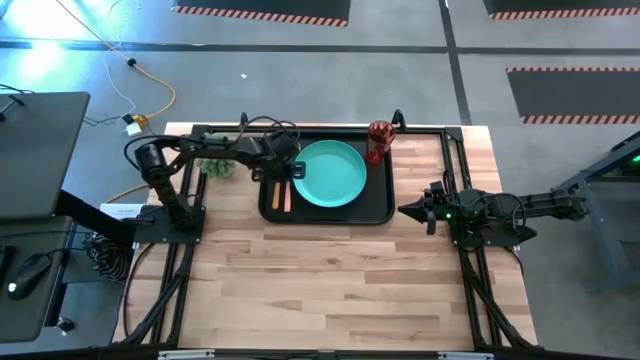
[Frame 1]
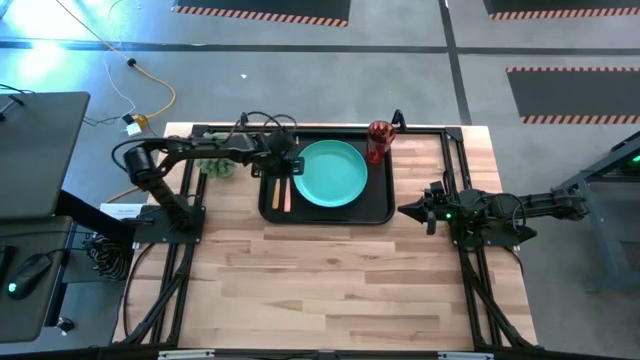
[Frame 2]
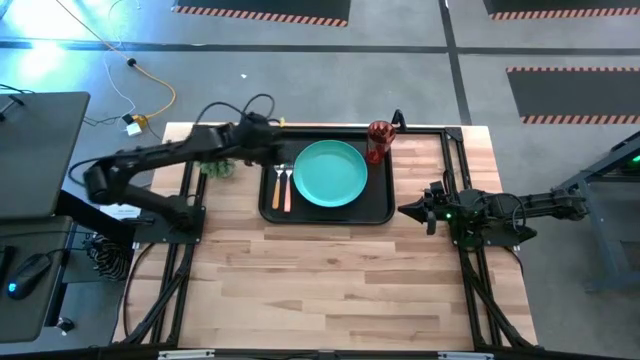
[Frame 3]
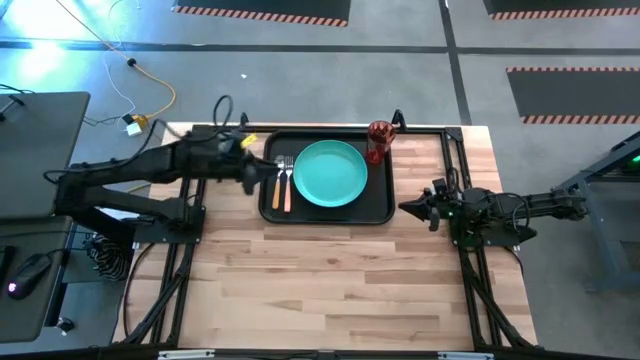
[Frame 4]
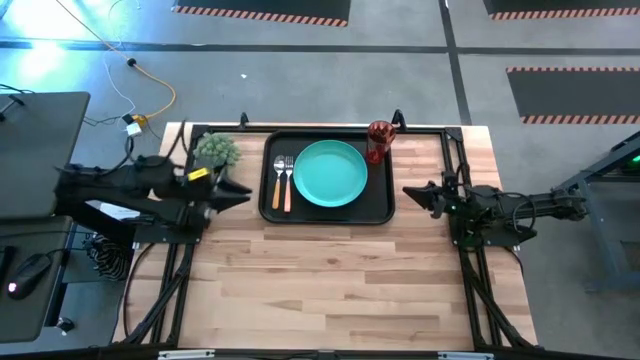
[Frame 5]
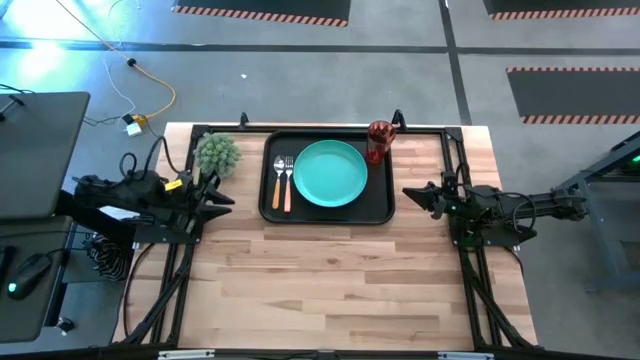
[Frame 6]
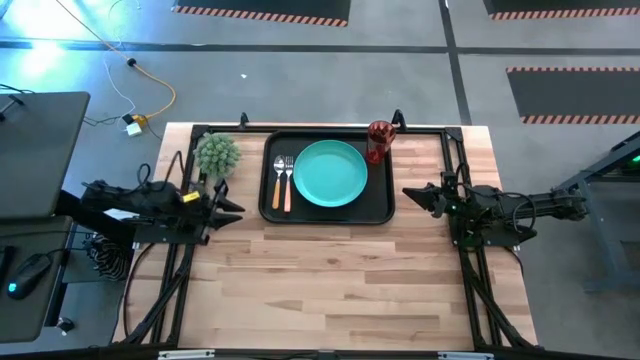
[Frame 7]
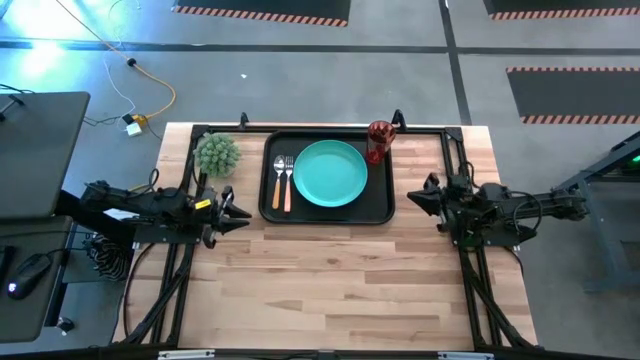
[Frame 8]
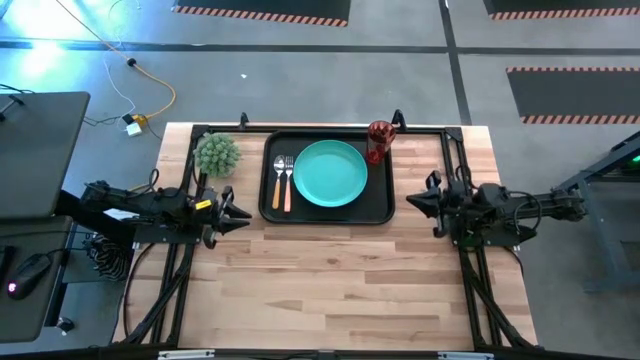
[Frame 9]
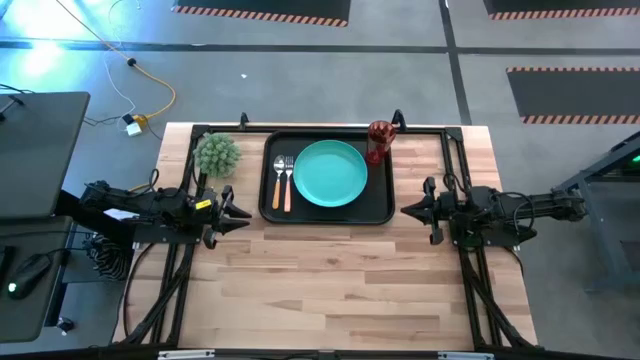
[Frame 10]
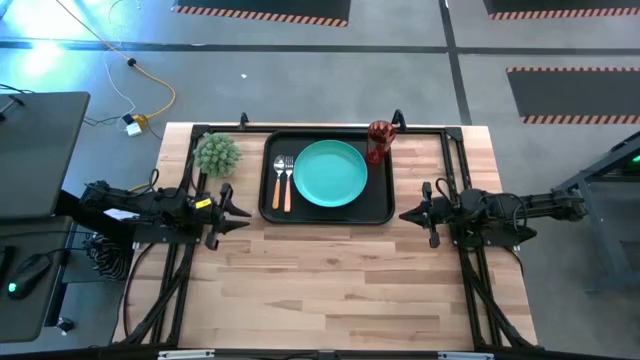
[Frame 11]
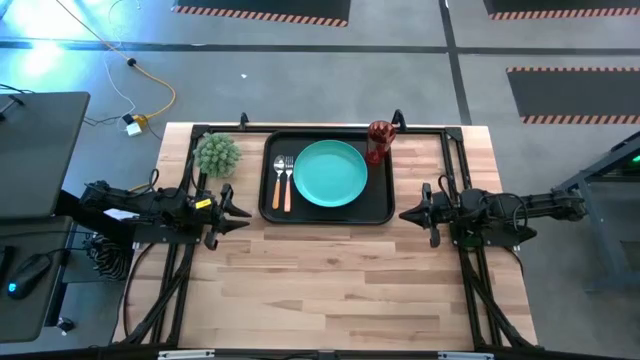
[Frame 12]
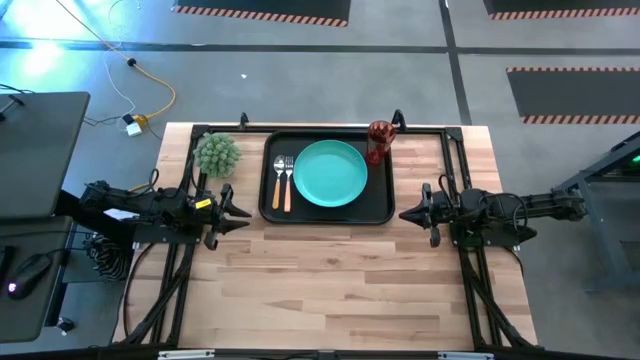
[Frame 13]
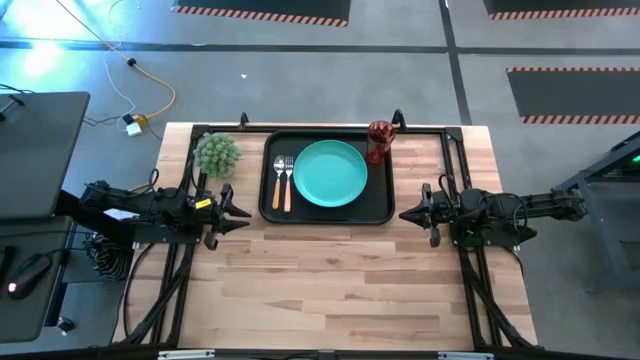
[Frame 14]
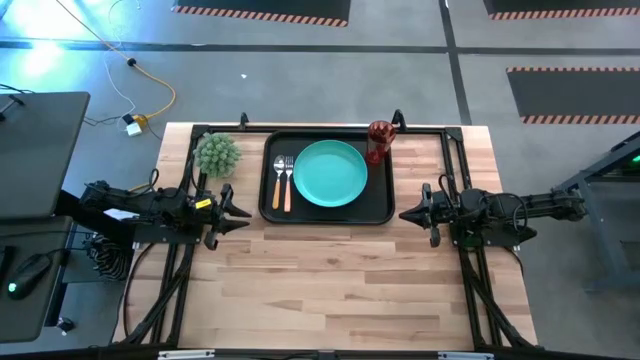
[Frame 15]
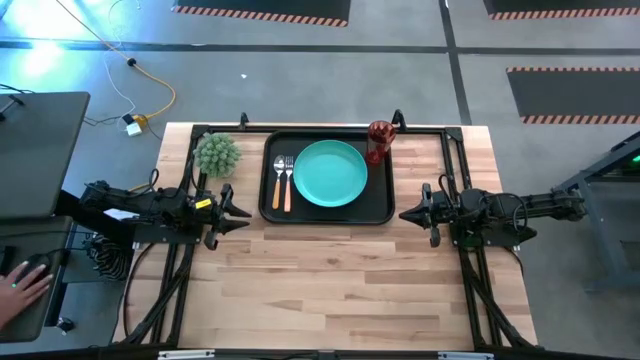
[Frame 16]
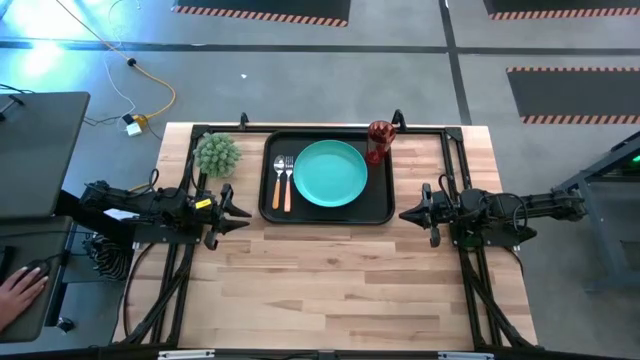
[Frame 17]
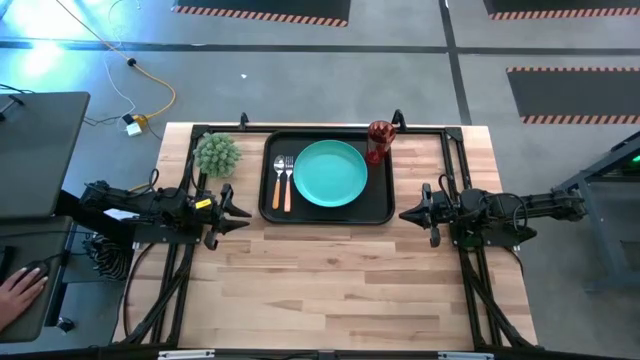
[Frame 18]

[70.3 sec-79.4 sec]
Task: Pick and place plate/cup/fork/spoon on tray
Return to Home Position

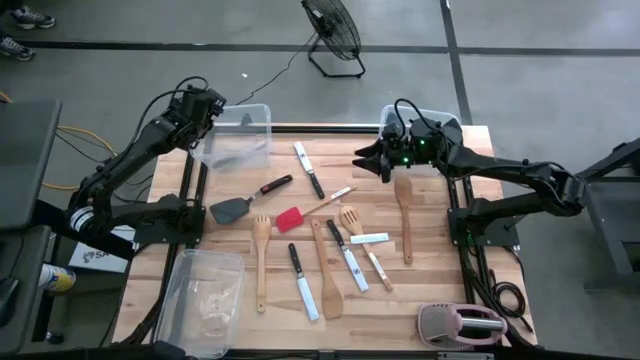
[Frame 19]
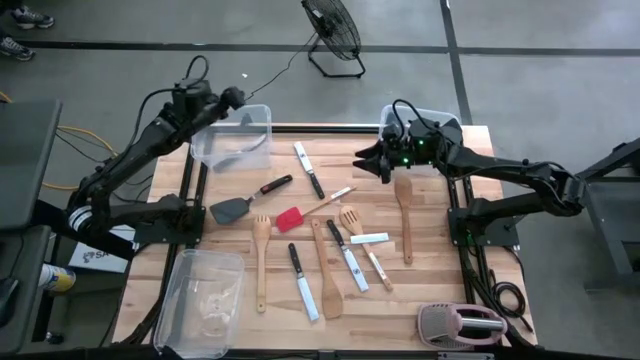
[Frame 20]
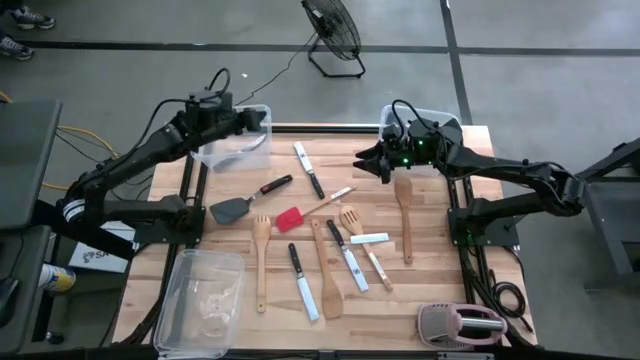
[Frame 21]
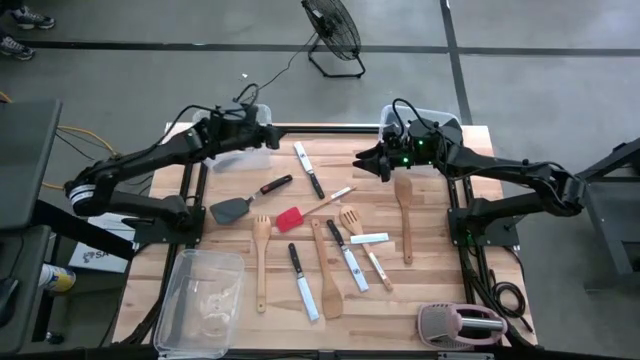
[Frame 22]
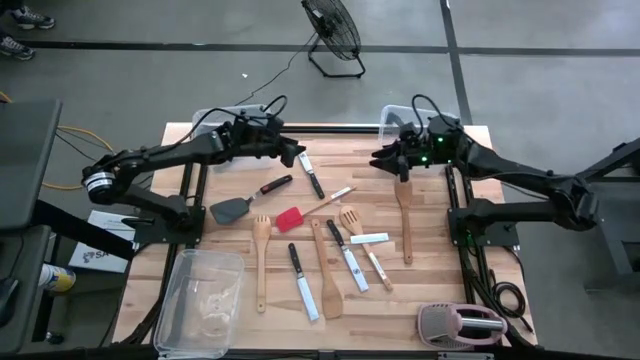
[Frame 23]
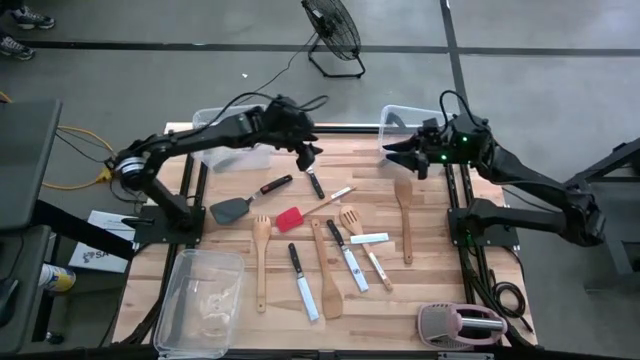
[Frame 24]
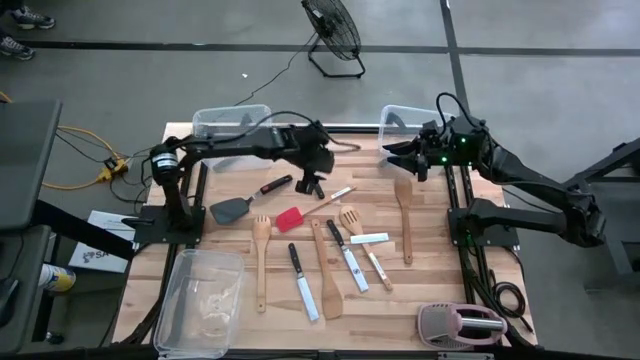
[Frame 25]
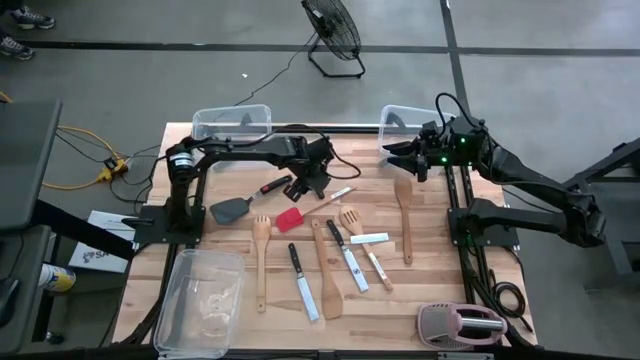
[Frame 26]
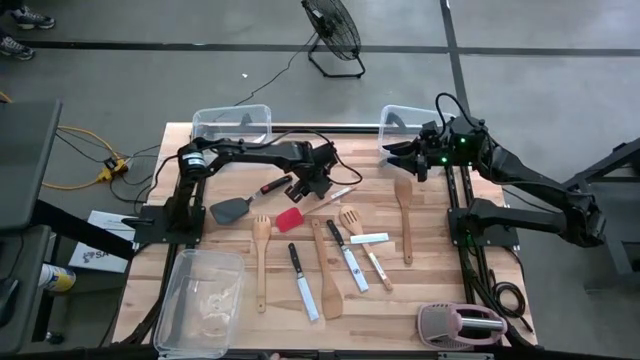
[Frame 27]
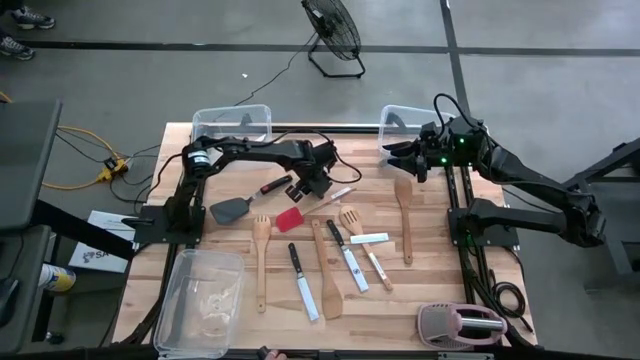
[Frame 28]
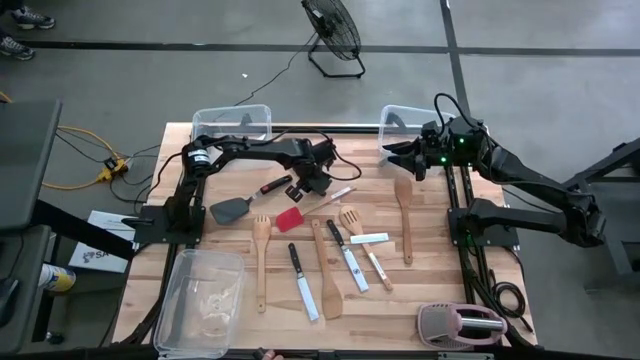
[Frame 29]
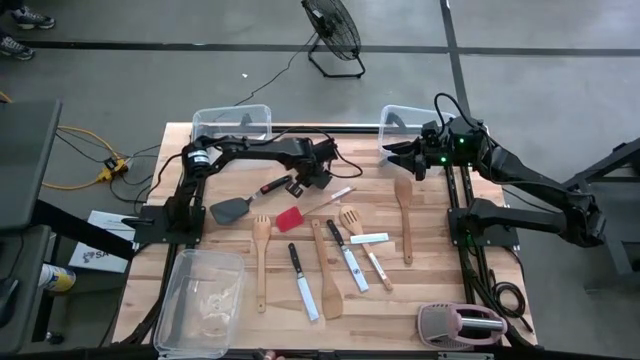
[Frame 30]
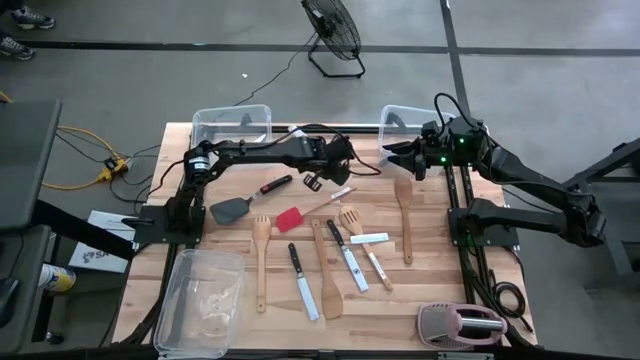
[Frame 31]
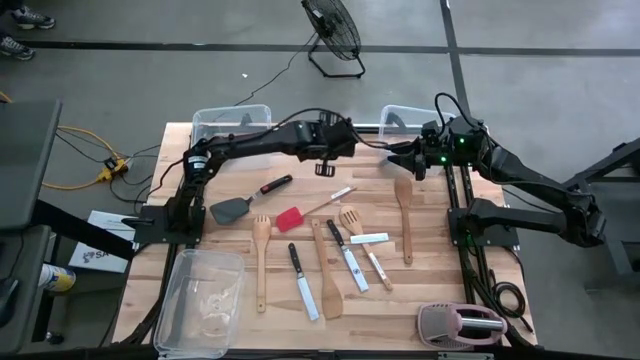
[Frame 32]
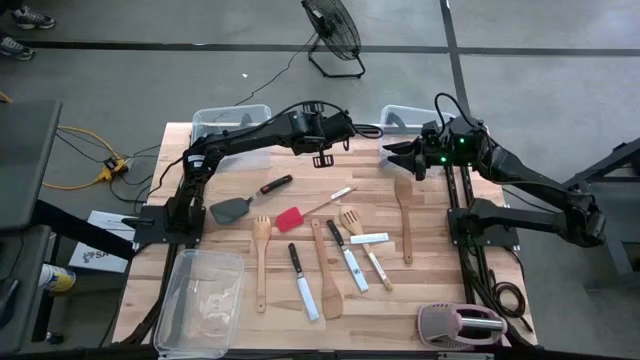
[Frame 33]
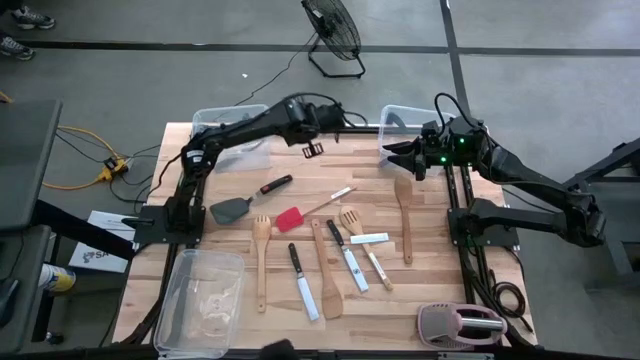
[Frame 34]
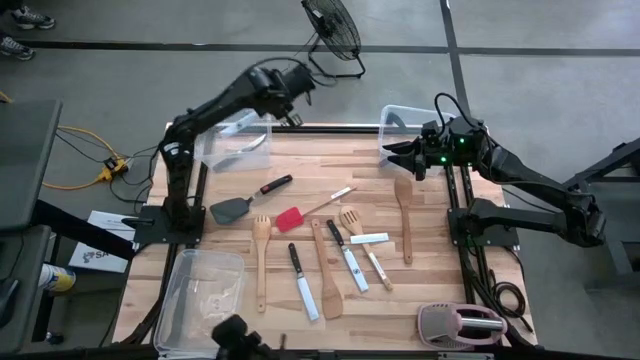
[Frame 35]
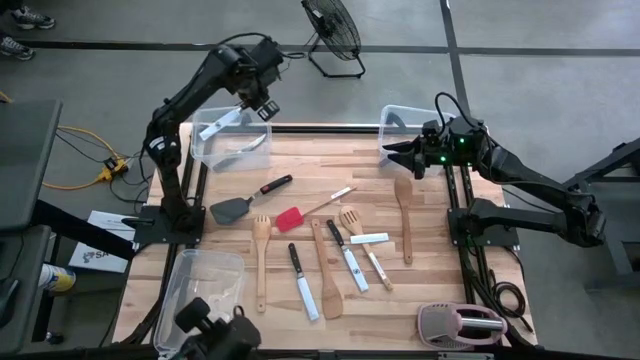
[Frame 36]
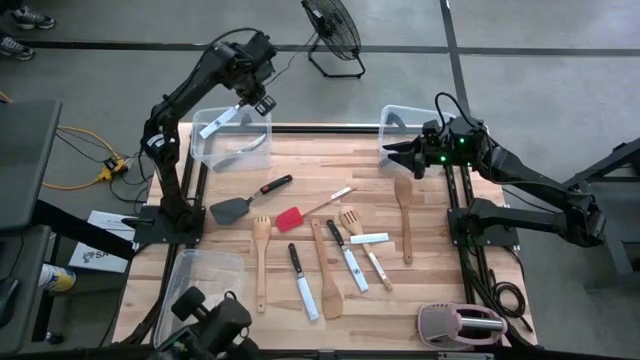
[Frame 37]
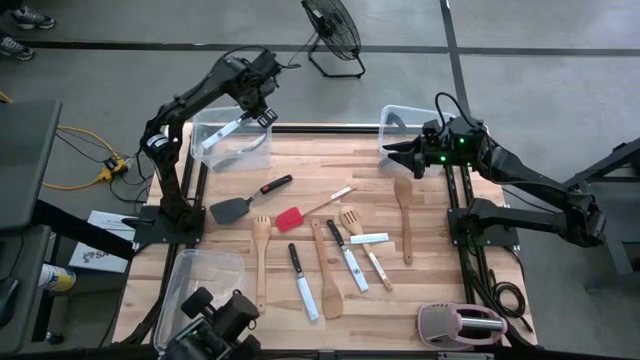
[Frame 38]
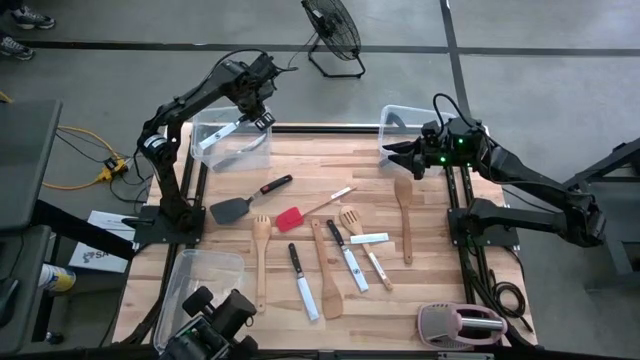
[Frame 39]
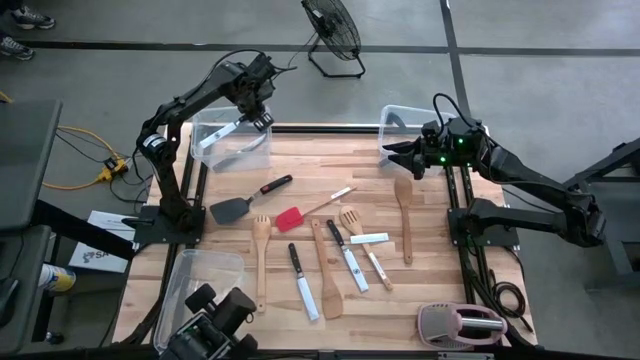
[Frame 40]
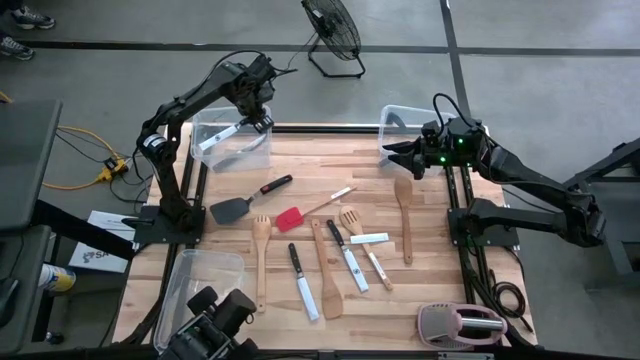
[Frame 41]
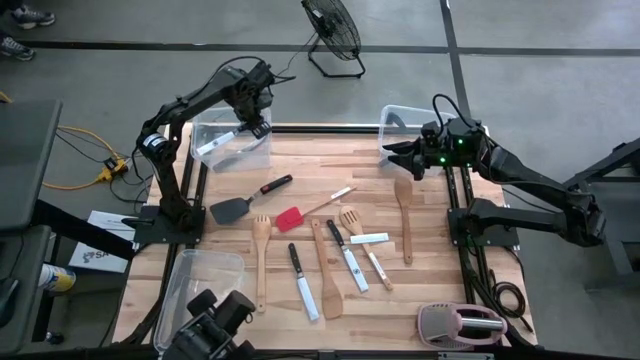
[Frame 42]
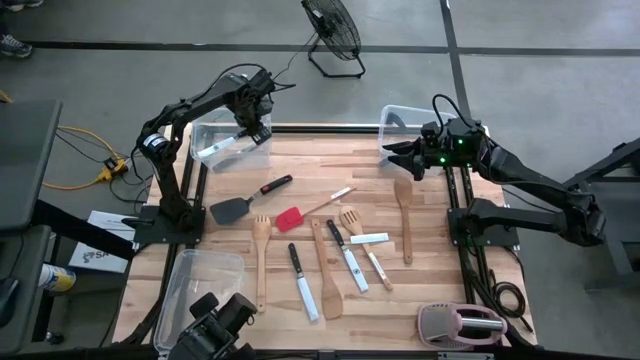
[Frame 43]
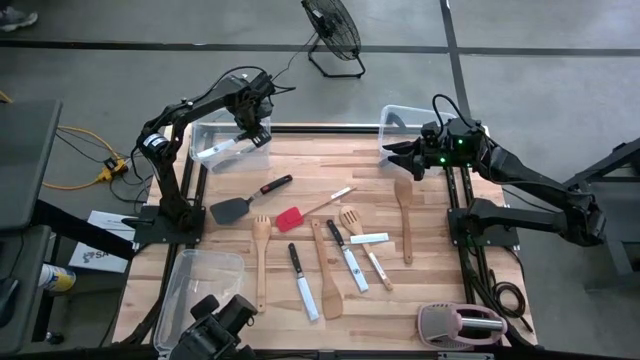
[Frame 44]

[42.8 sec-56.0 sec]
Task: Pick & Place Kitchen Items
Put the black kitchen knife into the top left transparent bin
